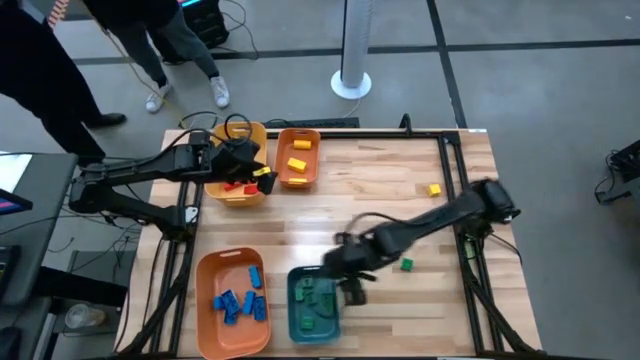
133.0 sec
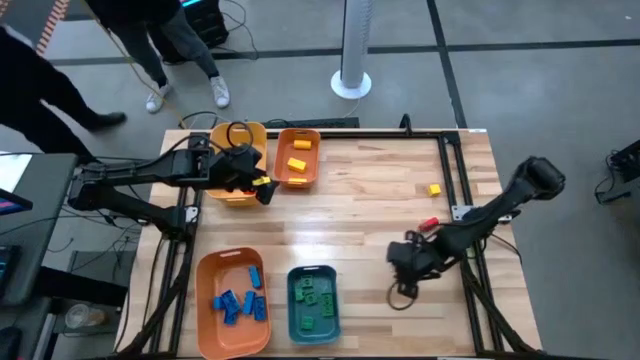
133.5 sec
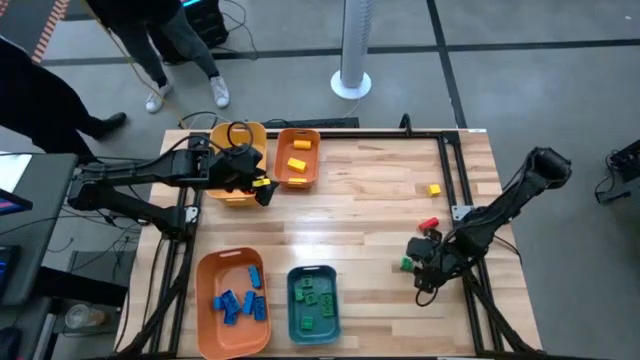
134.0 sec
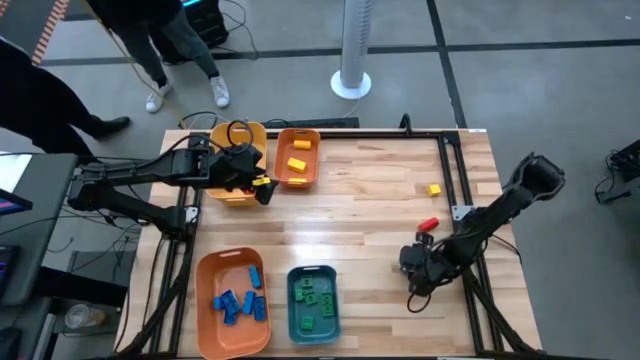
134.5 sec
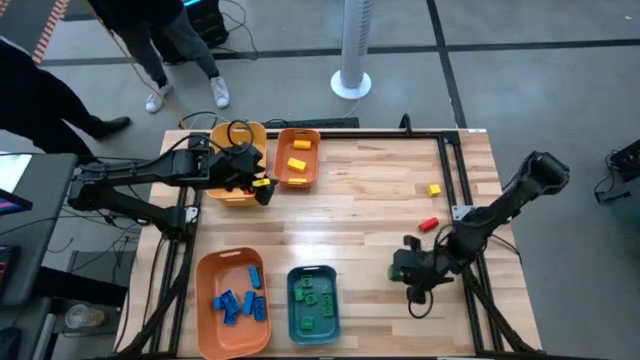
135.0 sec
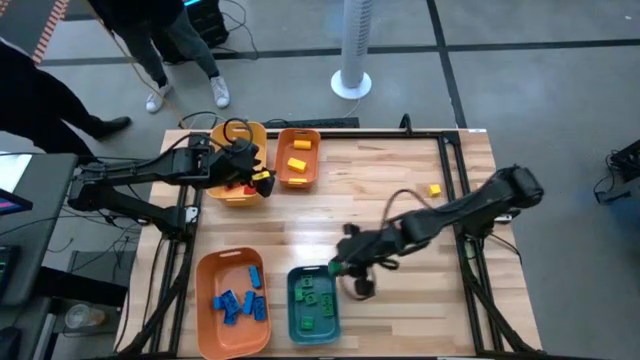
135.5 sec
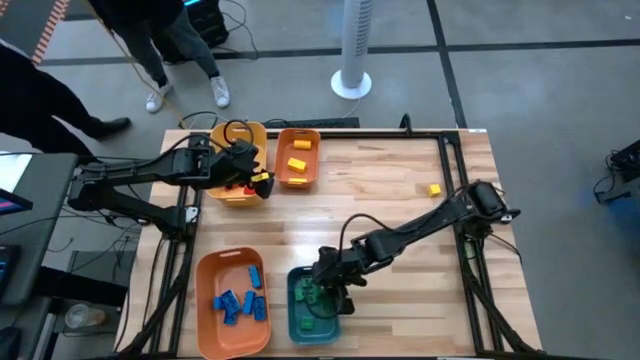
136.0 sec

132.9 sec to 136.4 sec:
Task: Sort blocks
Put the green game piece into the blue bin

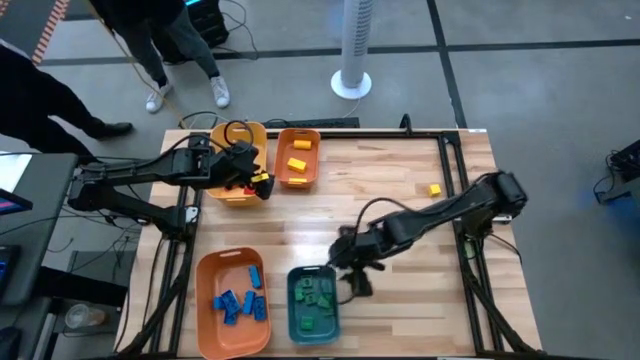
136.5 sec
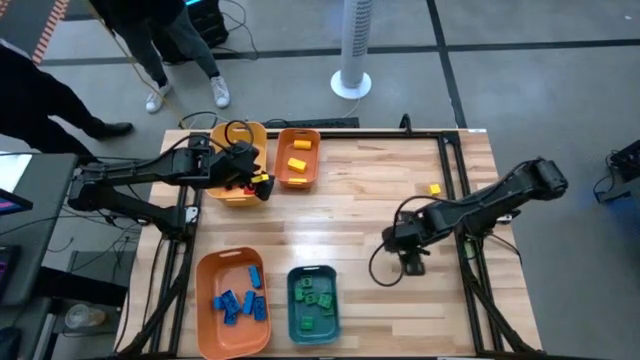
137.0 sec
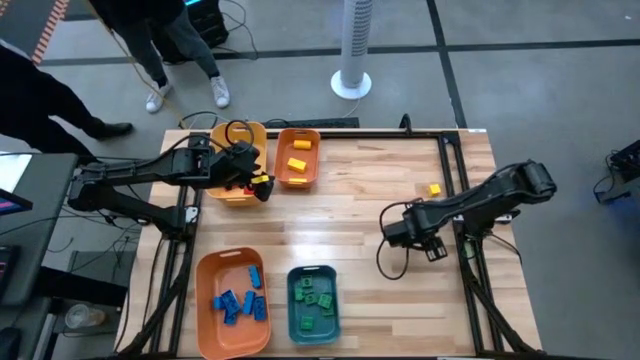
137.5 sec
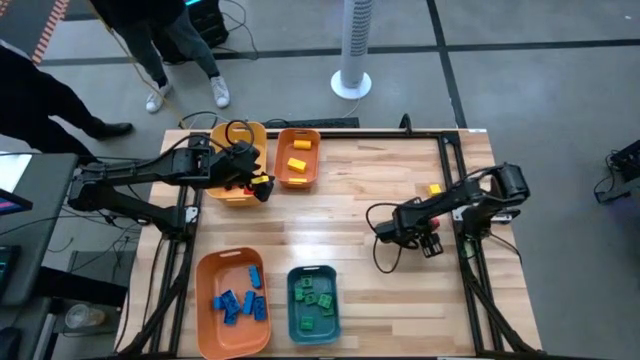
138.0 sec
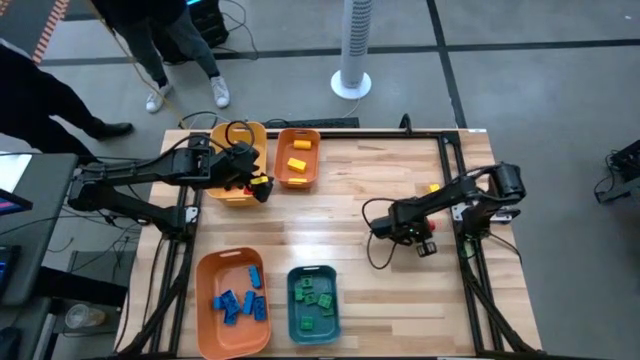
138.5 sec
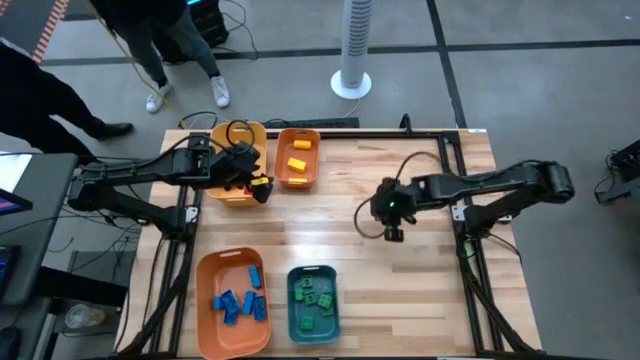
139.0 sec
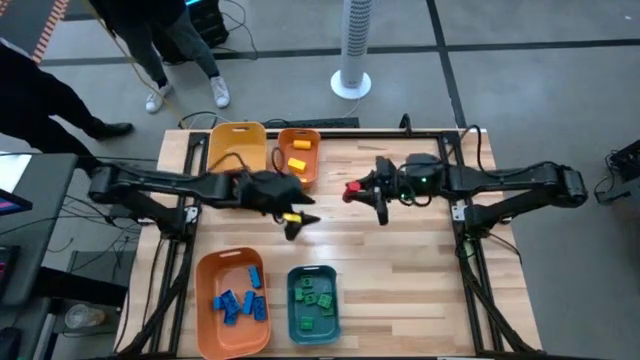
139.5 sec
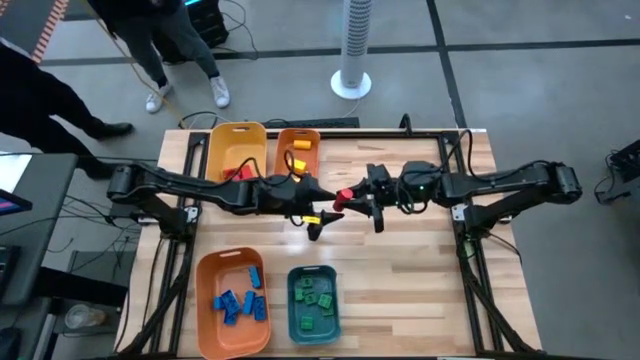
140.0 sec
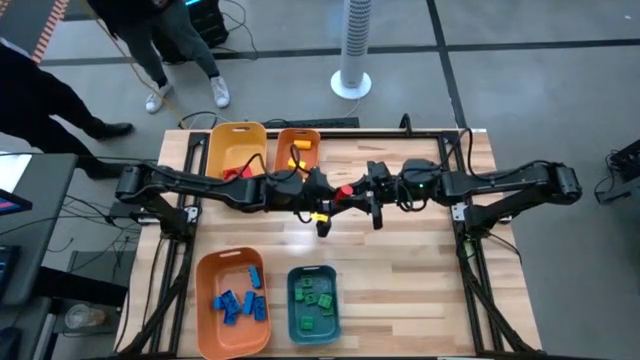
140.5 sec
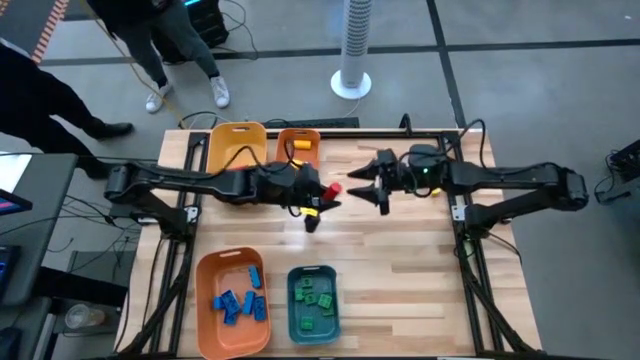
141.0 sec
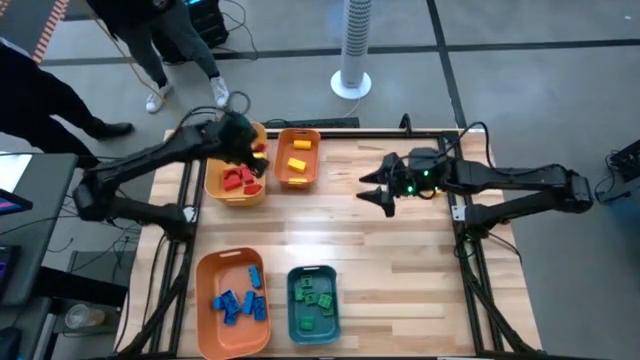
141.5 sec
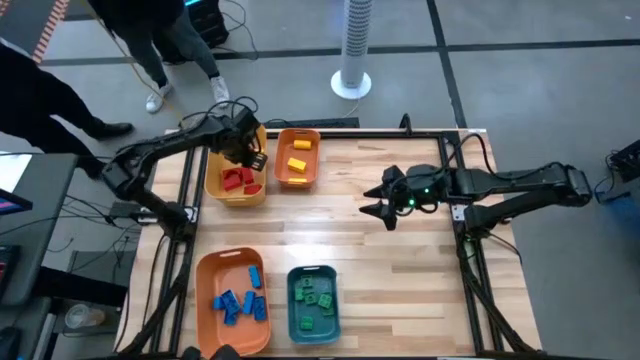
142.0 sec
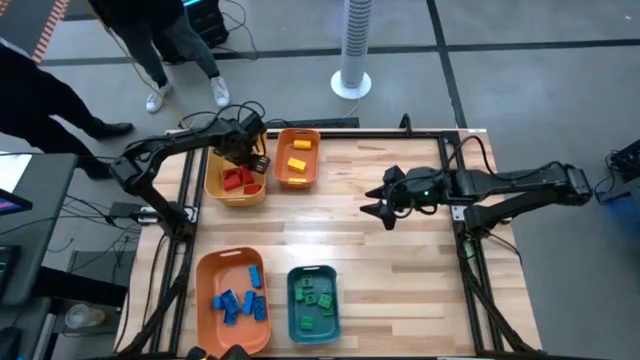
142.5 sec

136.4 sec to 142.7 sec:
Put the red wooden block into the yellow bin

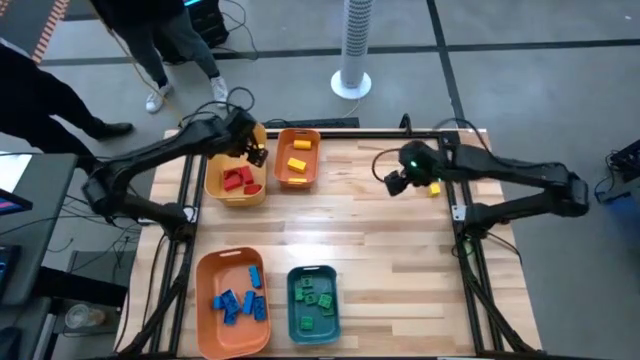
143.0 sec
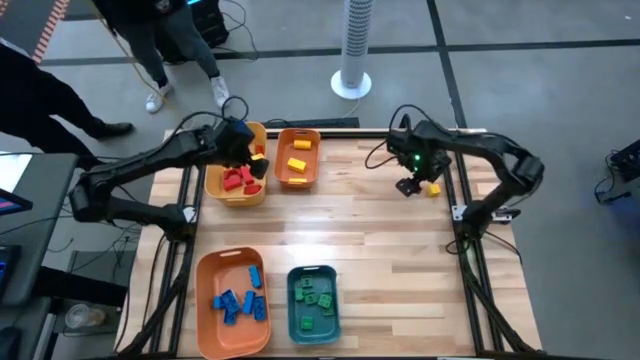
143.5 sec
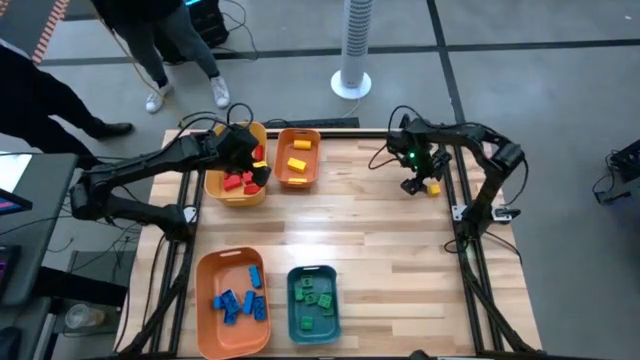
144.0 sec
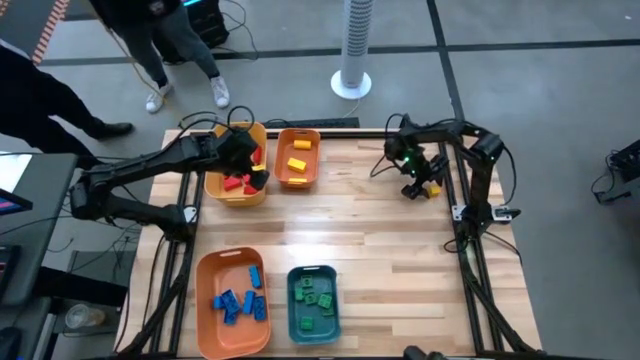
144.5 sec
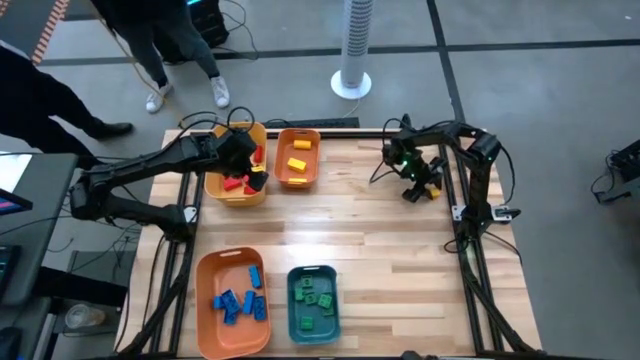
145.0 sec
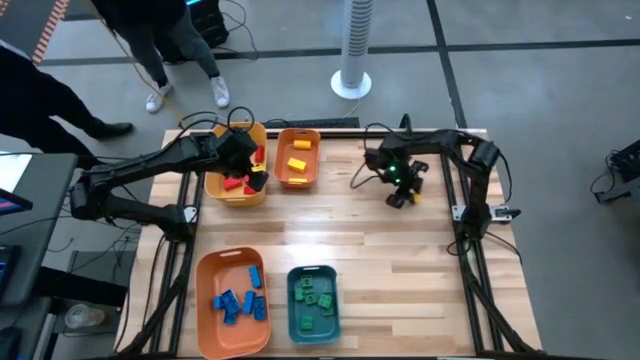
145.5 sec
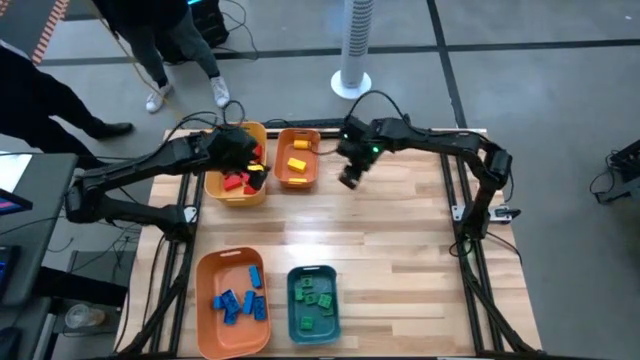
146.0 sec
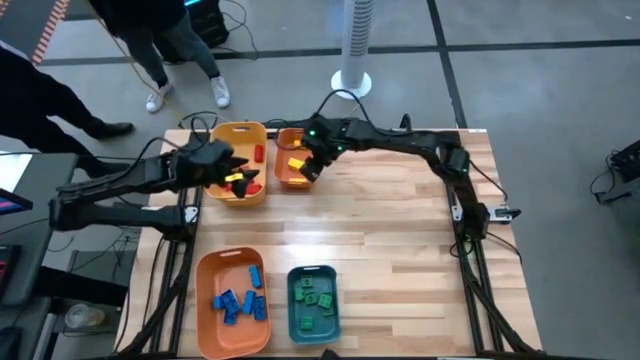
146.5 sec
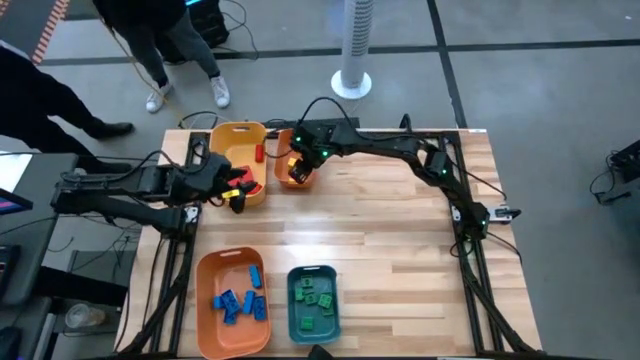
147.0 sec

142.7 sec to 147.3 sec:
Put the yellow wooden block into the small orange bin

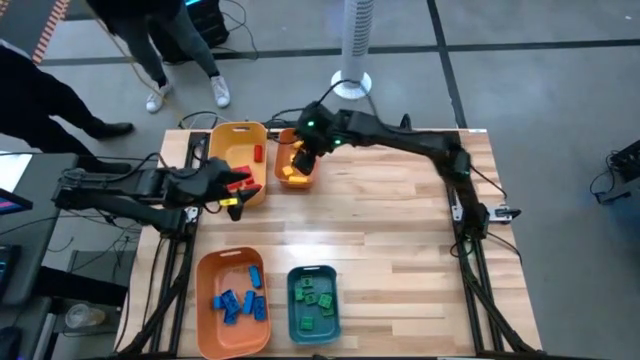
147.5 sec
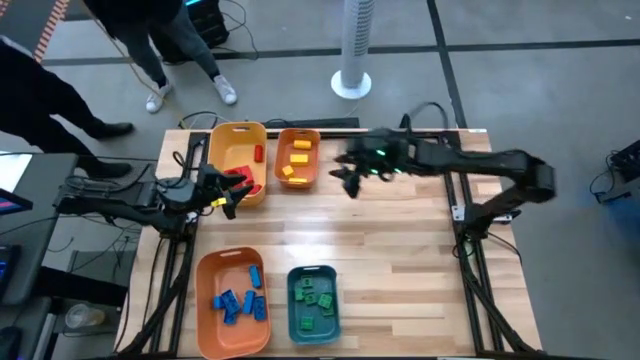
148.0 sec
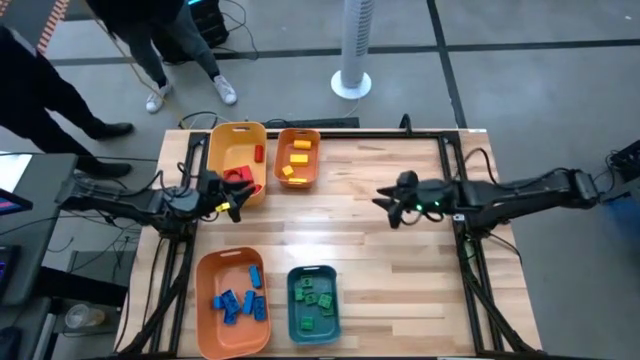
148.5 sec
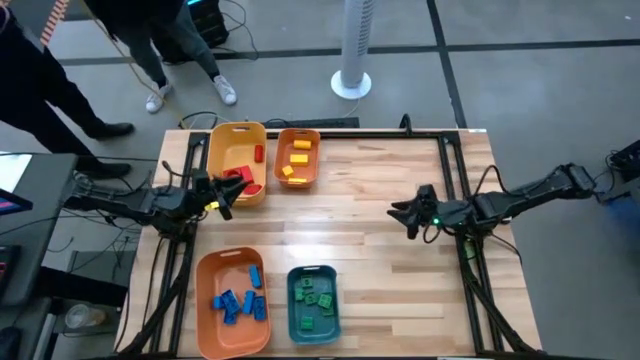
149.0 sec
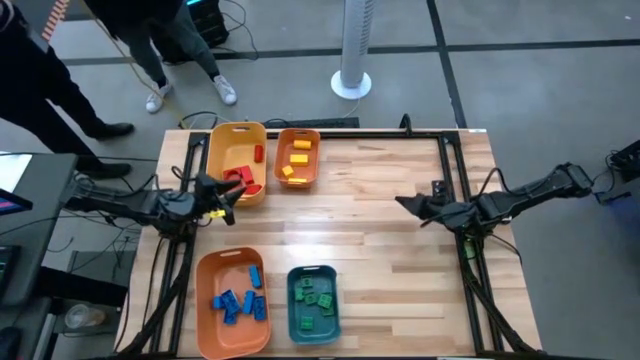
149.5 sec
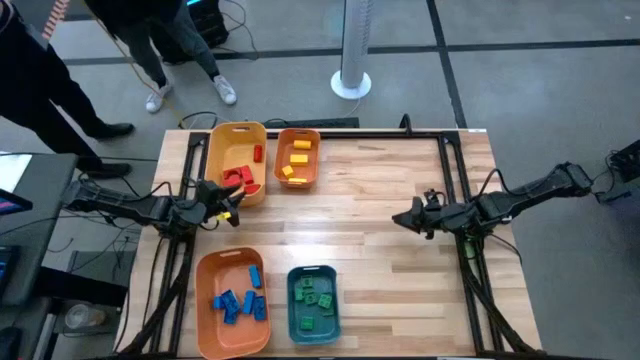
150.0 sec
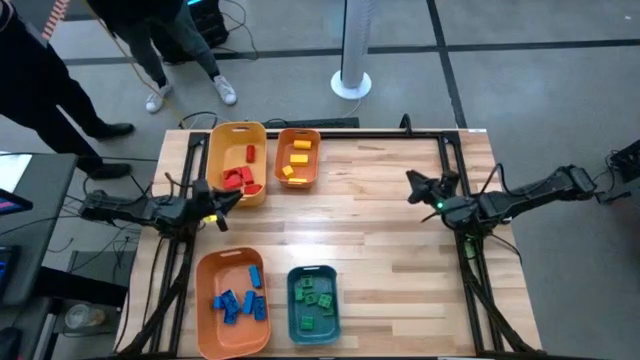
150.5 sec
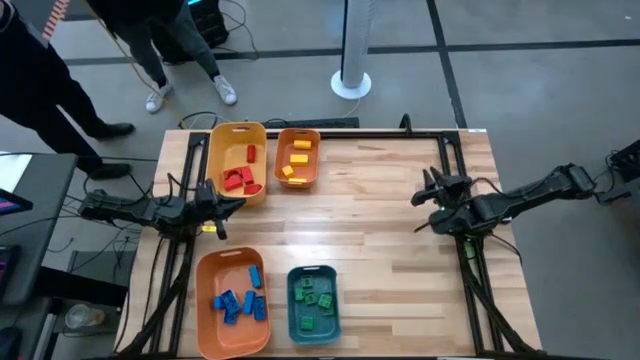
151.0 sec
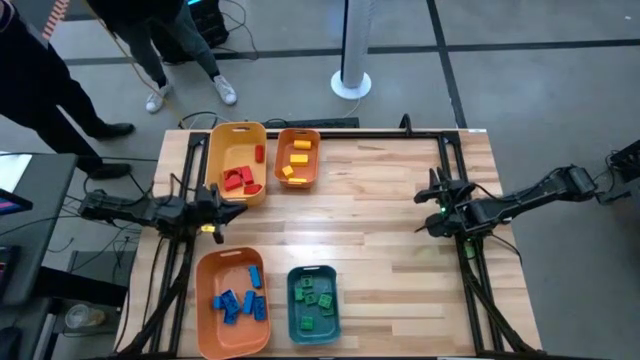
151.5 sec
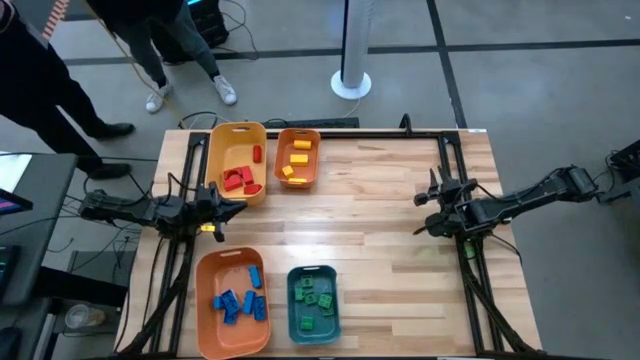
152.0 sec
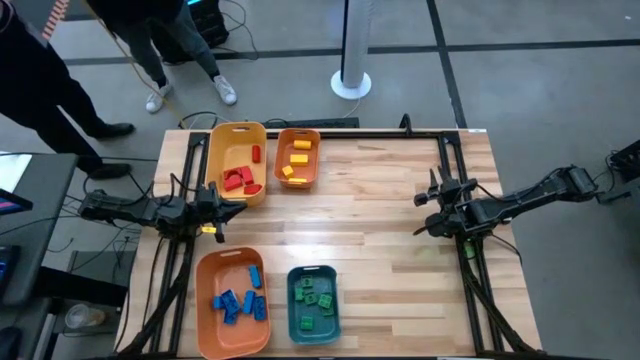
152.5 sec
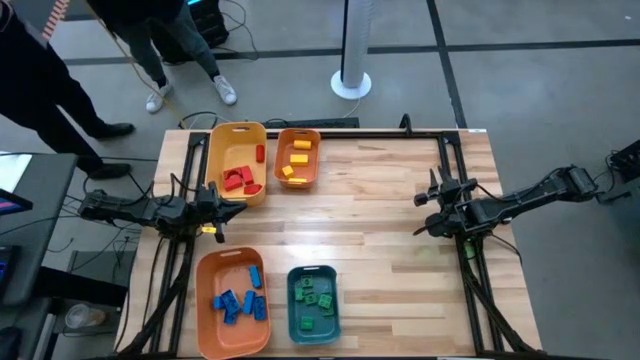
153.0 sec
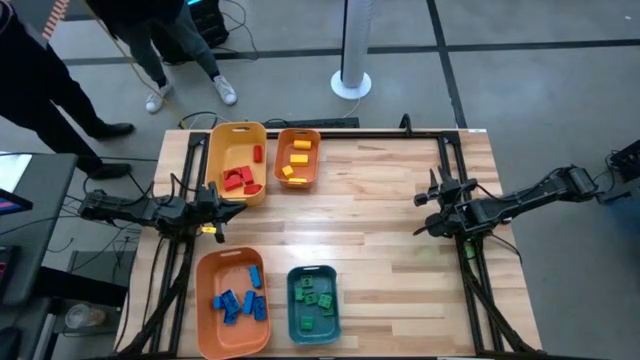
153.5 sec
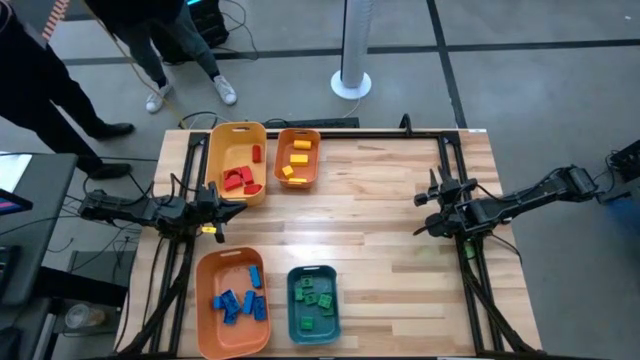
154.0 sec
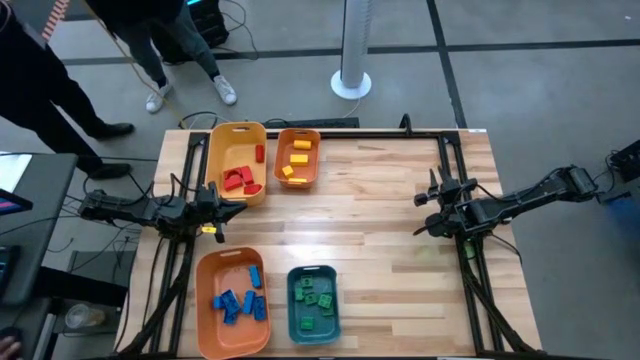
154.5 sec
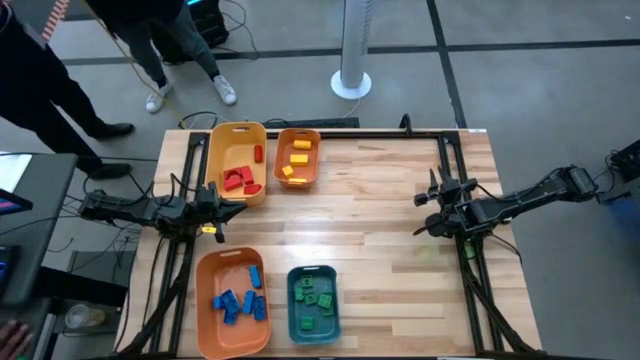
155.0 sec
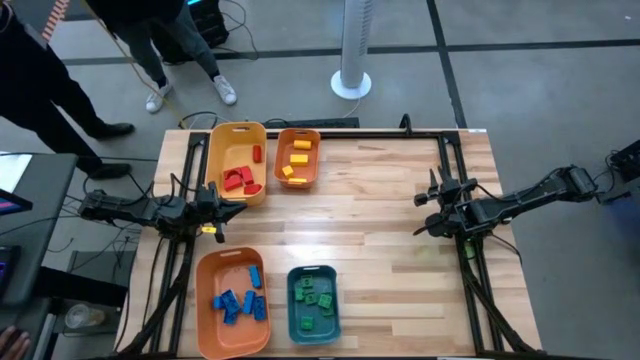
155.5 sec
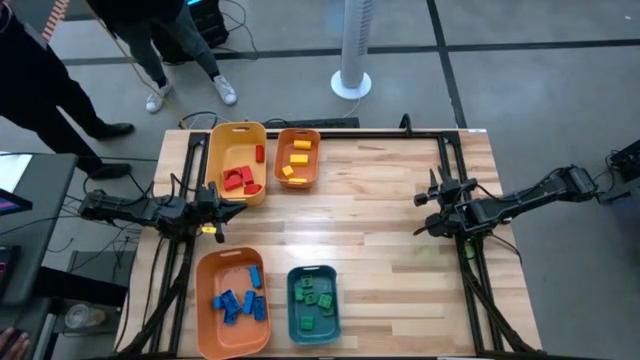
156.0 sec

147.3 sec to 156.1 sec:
Return to Home Position
